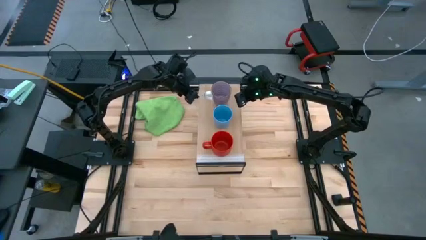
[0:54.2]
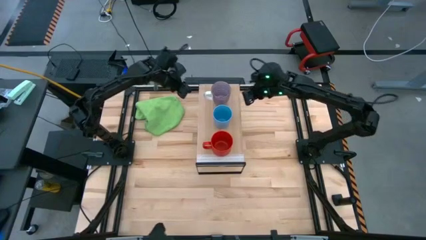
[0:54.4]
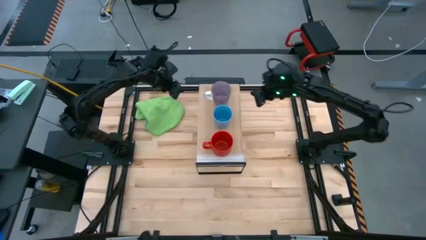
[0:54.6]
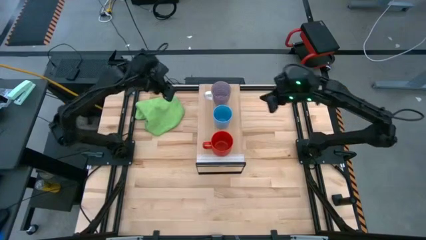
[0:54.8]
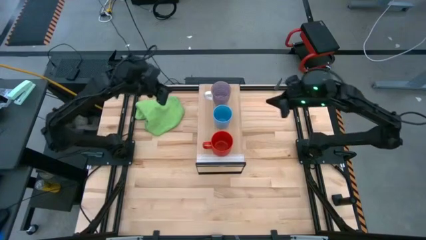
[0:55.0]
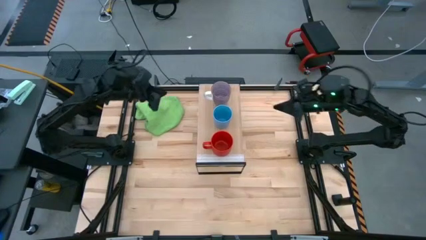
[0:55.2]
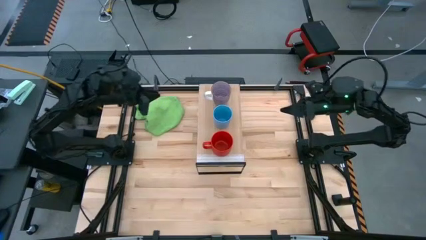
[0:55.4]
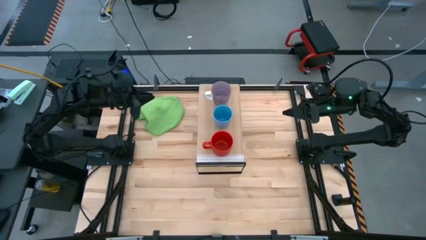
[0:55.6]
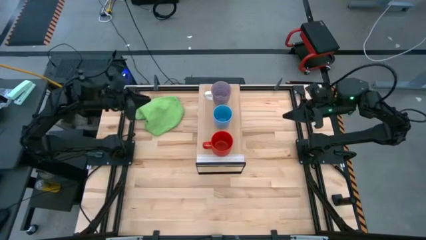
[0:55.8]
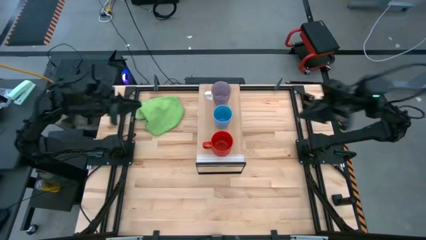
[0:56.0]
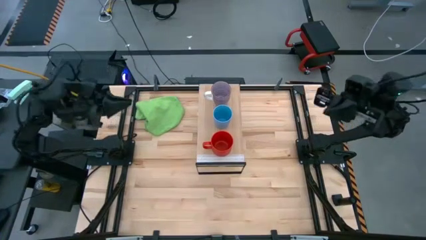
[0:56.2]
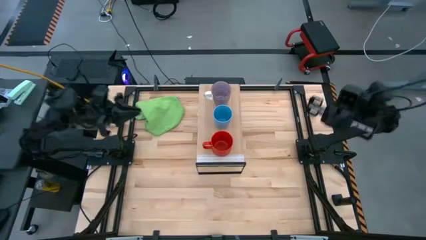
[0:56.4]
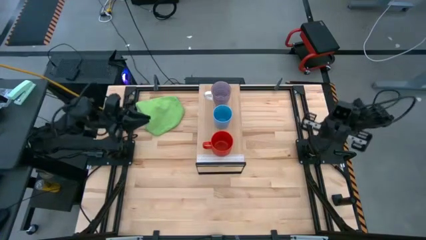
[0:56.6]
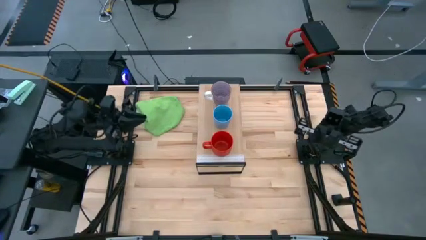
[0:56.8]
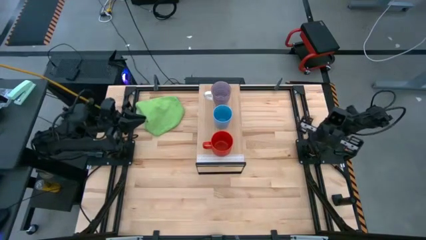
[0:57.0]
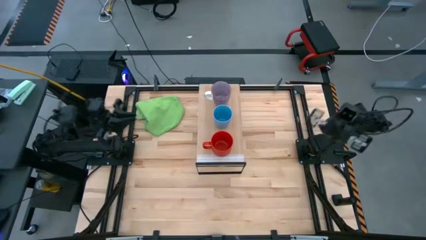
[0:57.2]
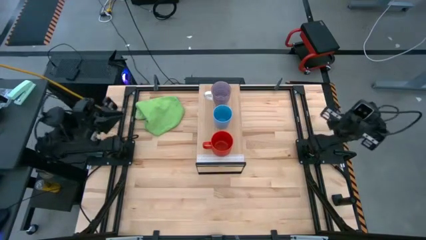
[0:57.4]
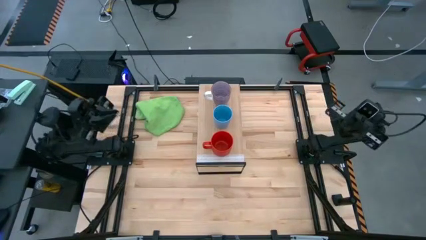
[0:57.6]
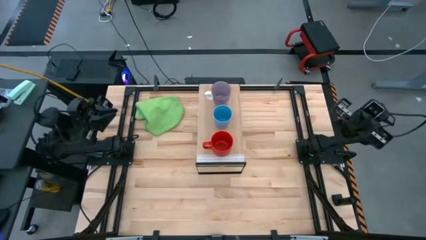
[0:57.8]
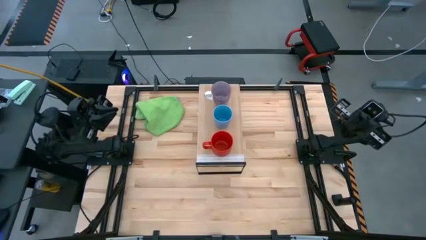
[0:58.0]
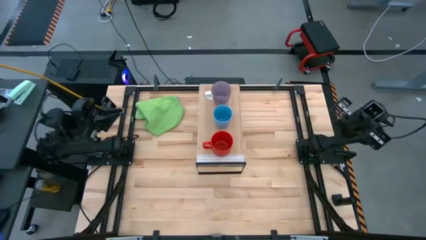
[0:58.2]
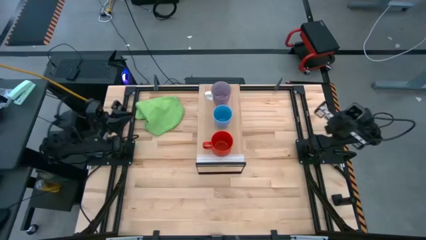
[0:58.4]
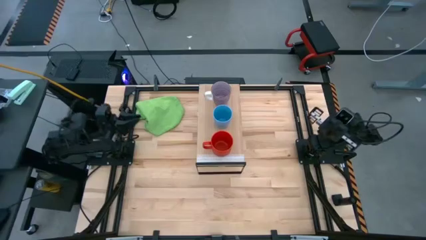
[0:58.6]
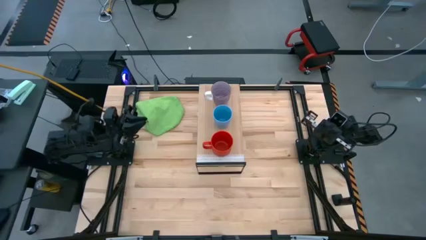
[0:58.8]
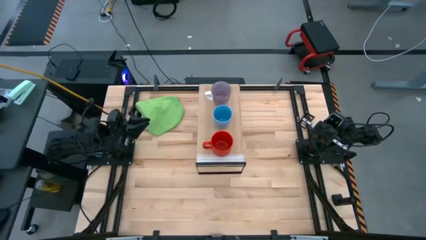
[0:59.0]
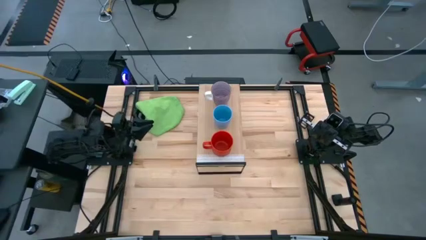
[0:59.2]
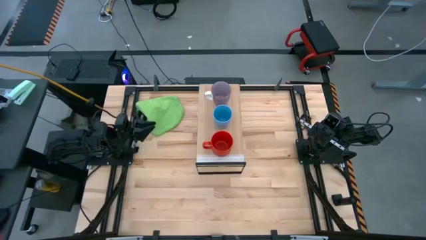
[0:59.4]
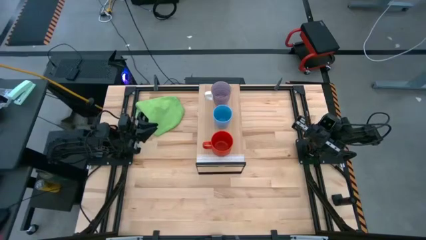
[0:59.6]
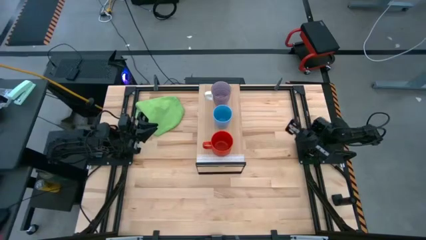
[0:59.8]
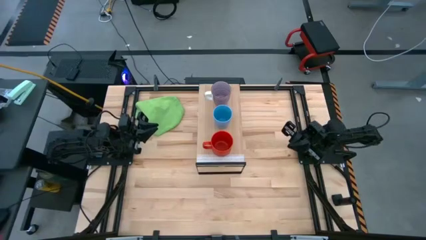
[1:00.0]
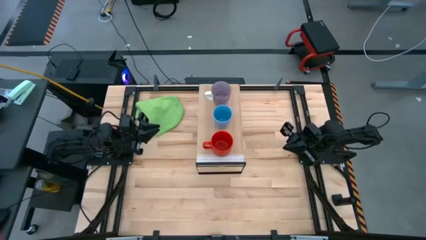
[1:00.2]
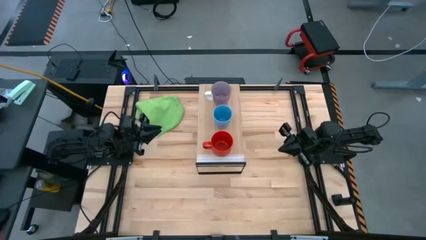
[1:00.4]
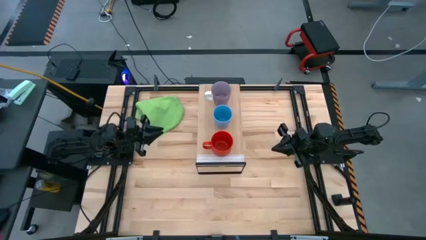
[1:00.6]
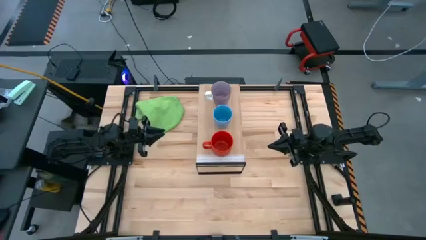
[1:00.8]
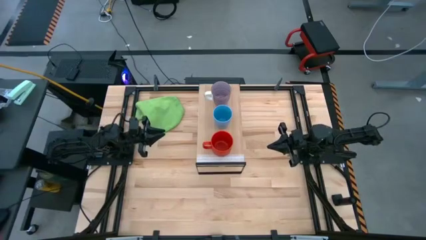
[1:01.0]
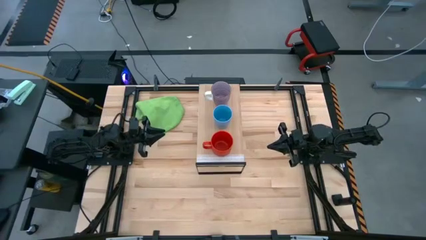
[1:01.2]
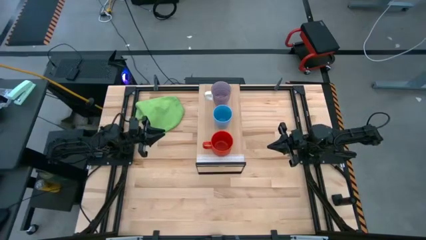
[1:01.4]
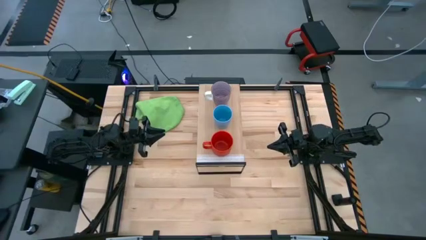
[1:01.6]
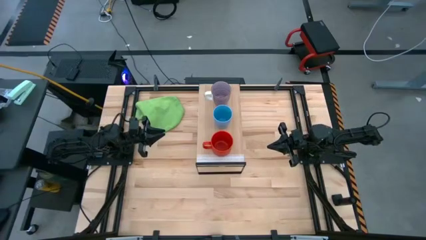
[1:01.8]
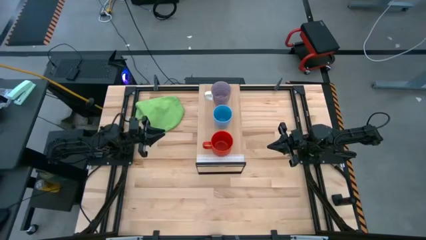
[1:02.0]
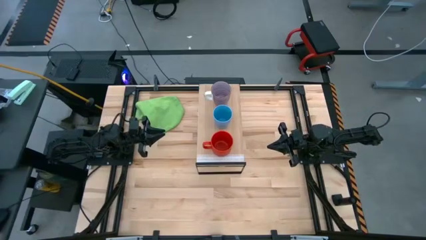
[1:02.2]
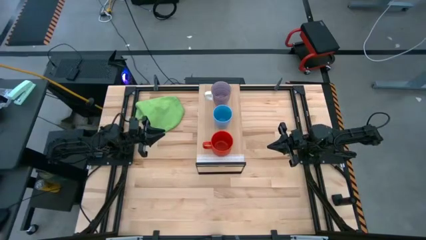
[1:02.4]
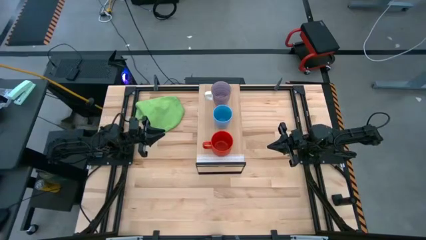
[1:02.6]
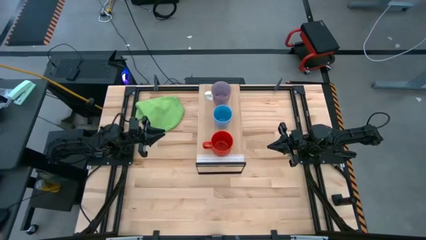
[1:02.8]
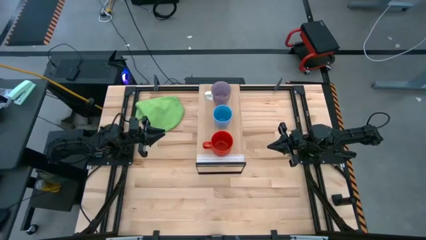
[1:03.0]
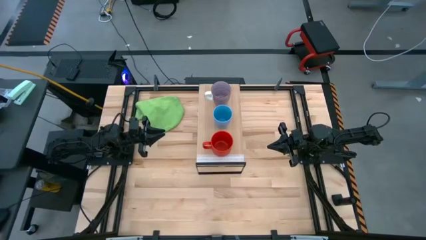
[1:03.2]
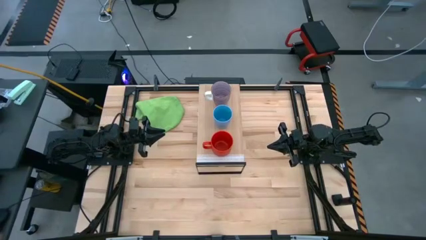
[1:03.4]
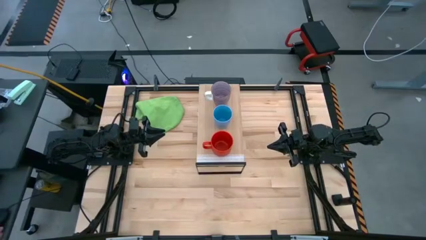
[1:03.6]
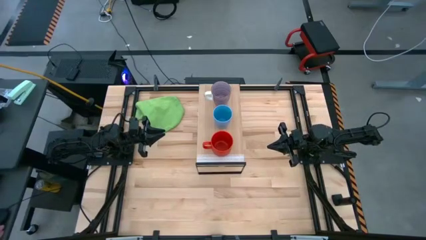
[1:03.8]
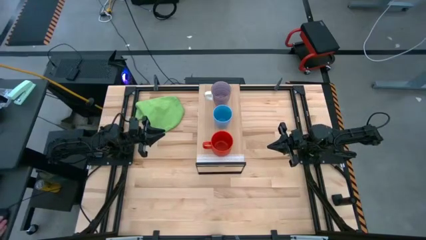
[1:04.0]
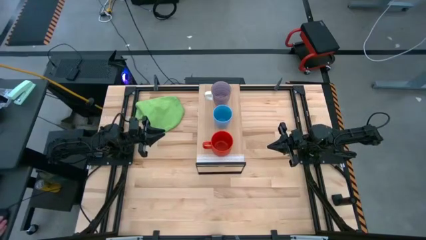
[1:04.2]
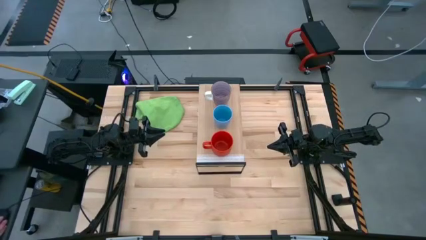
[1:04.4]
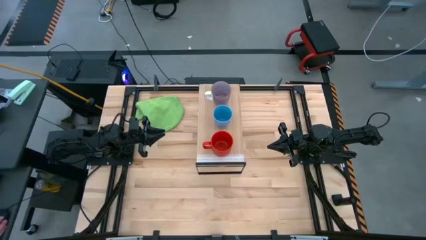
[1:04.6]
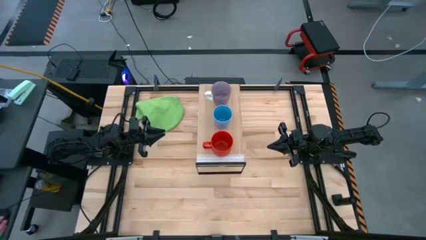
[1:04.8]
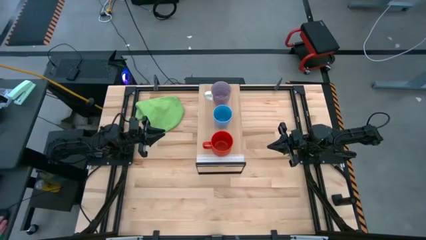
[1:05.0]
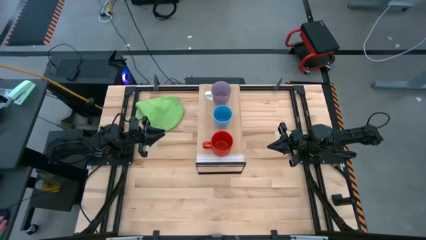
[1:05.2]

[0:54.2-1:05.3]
Task: Stack small to large cups/mugs on shelf
Return to Home Position

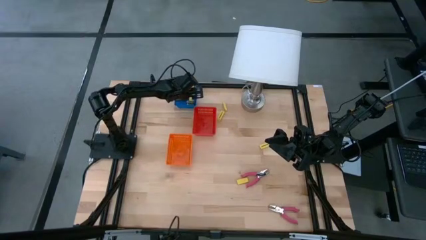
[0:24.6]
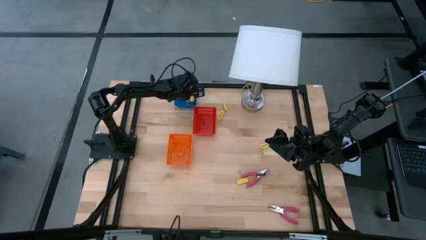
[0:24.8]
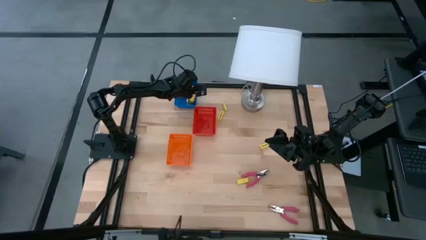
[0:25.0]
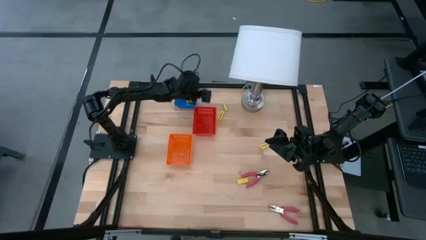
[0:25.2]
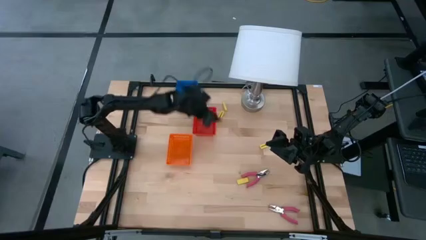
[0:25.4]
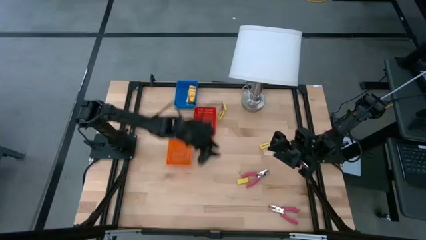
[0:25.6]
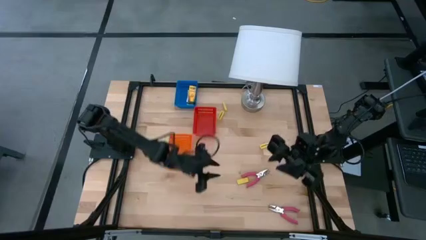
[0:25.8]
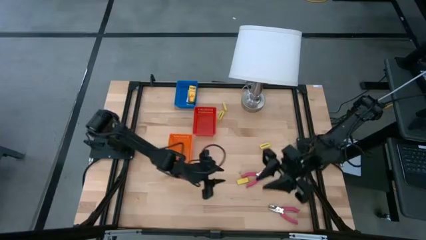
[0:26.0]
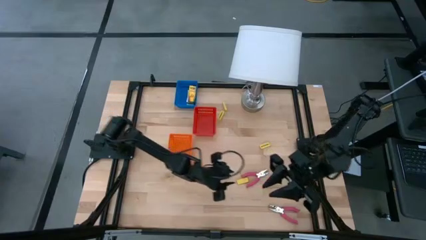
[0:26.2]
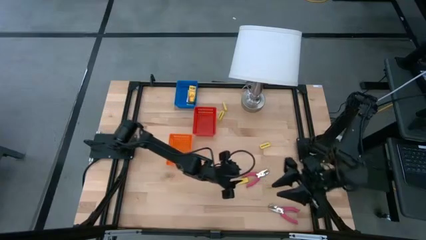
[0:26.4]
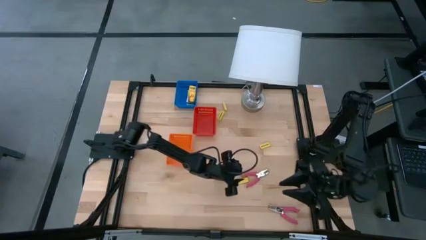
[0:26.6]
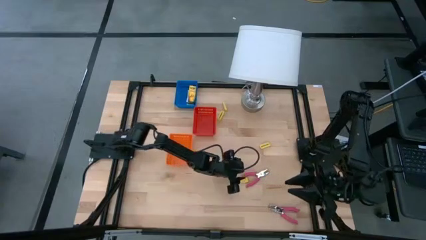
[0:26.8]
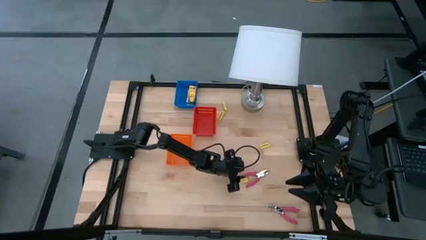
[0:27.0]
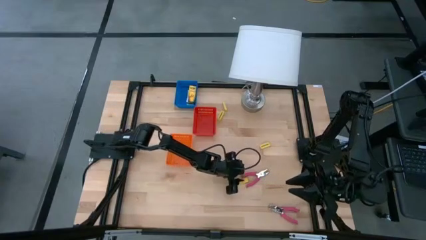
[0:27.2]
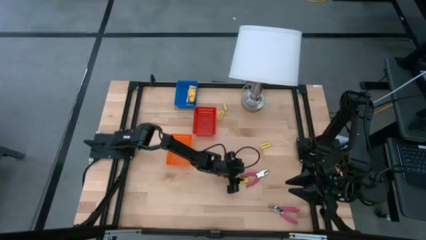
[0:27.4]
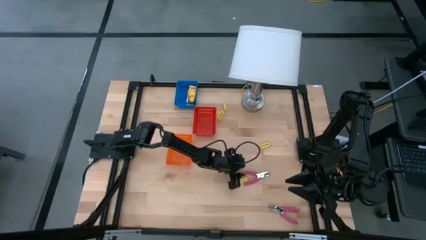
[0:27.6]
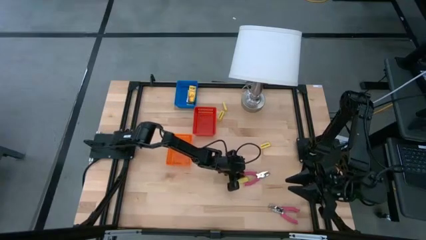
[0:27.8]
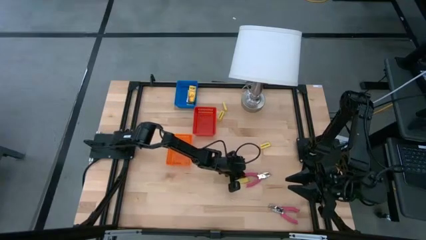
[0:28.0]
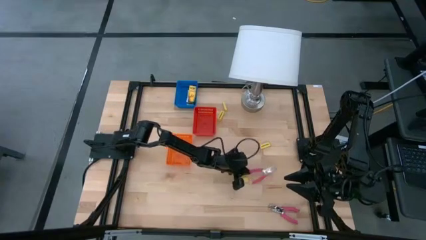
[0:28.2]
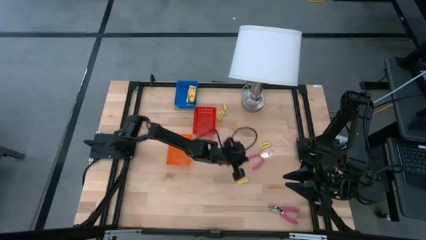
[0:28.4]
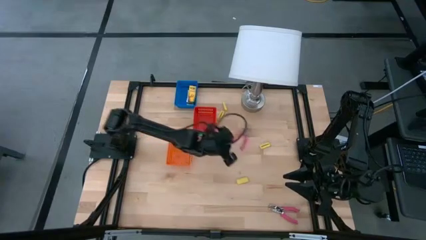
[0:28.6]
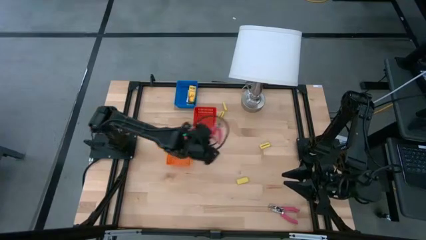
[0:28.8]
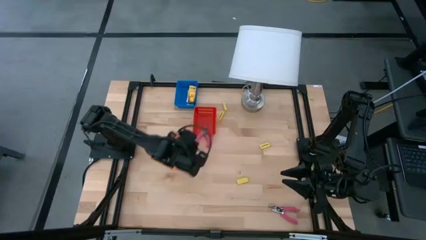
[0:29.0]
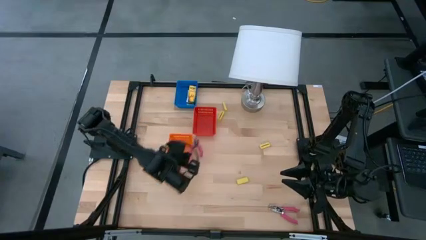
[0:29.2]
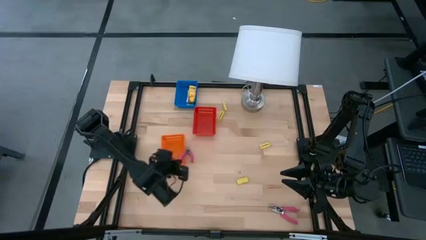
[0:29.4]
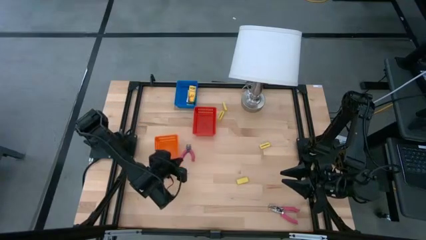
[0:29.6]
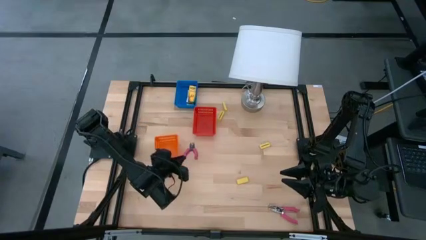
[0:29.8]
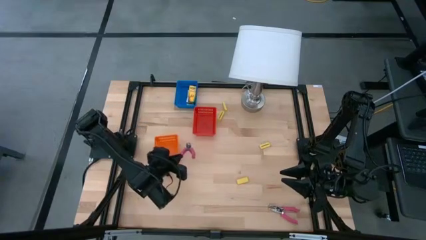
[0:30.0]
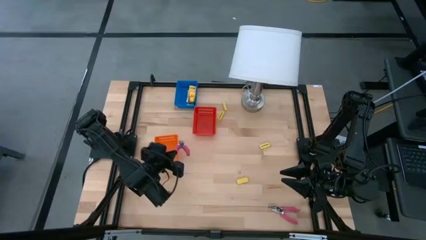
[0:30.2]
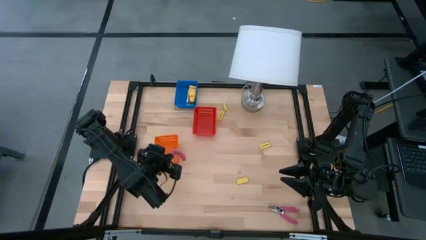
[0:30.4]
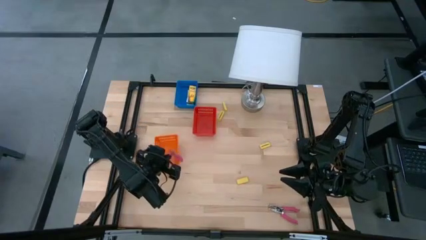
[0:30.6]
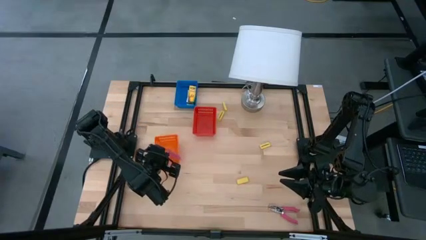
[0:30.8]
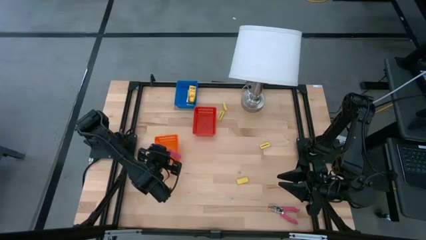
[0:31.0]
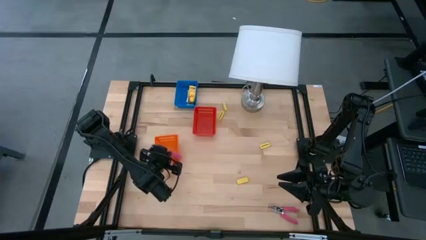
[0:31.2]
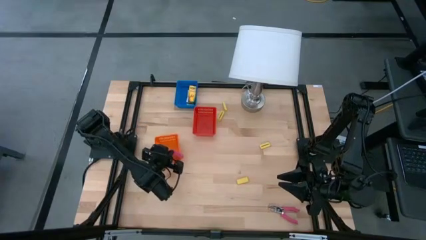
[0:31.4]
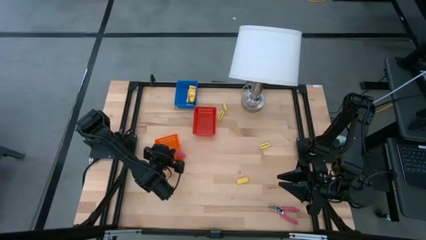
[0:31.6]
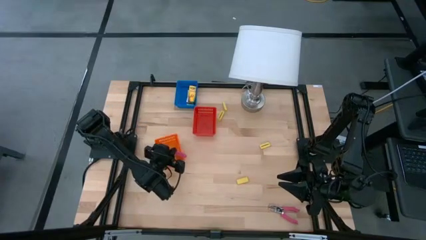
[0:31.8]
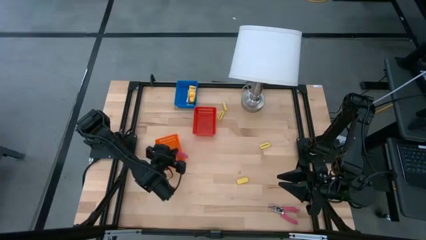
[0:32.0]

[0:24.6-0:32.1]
Task: Pick & Place School Supplies
Put the pink hole puncher into the orange bin
